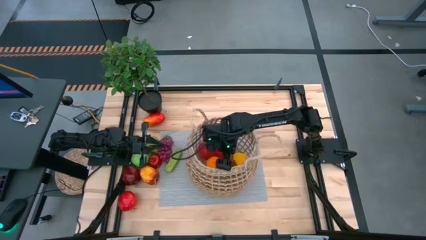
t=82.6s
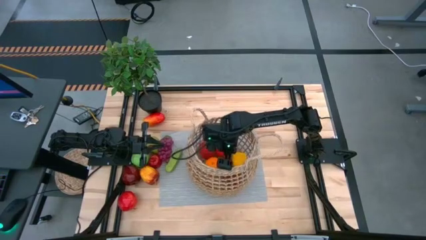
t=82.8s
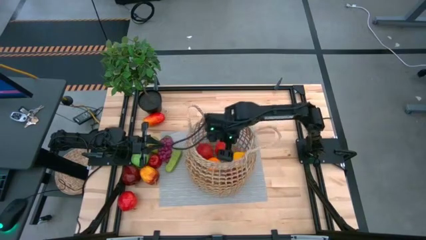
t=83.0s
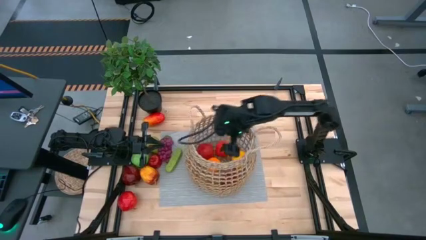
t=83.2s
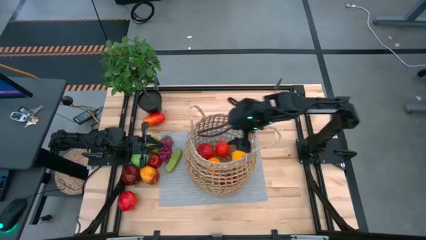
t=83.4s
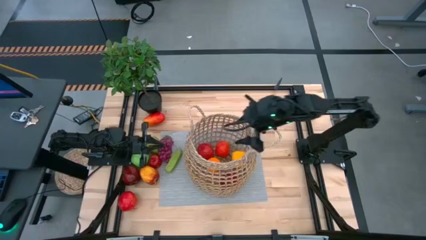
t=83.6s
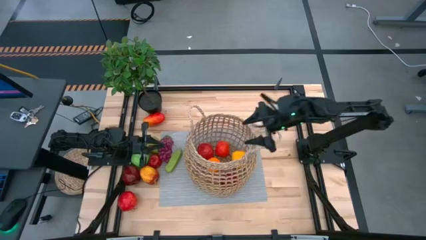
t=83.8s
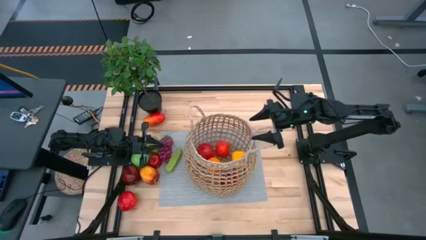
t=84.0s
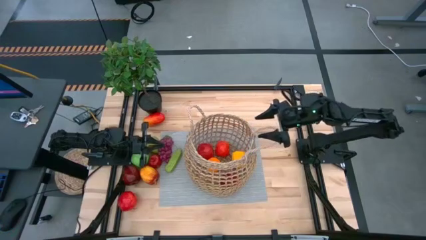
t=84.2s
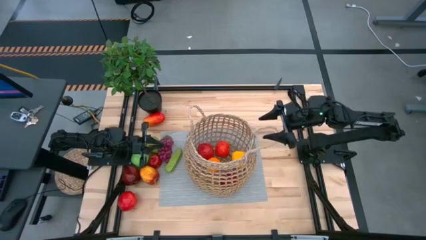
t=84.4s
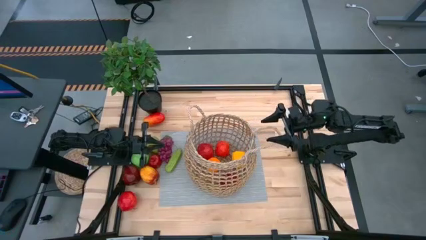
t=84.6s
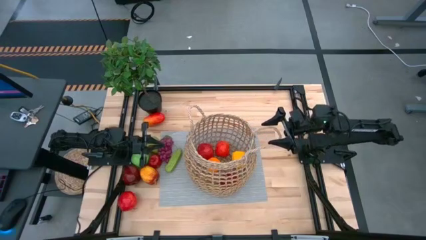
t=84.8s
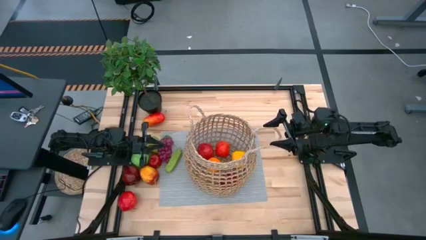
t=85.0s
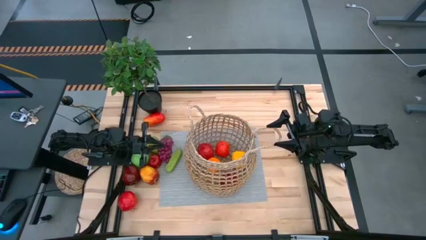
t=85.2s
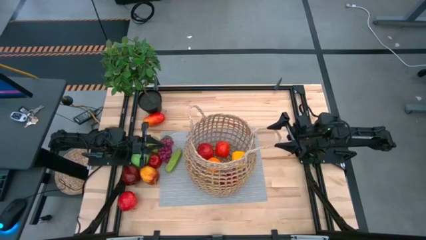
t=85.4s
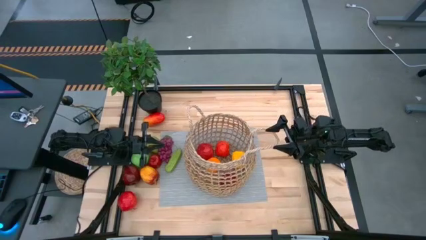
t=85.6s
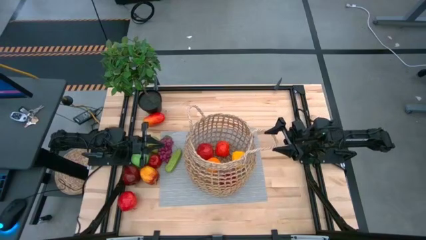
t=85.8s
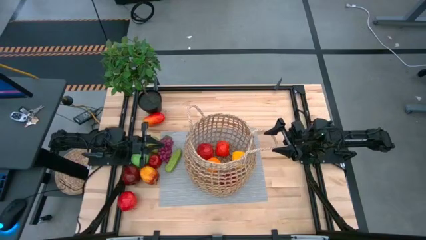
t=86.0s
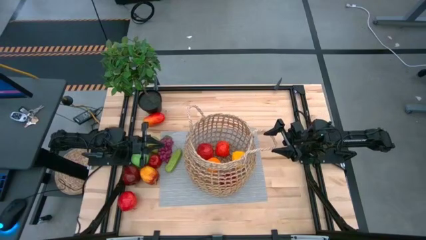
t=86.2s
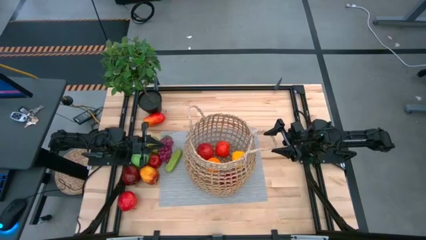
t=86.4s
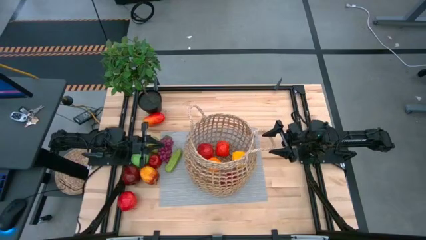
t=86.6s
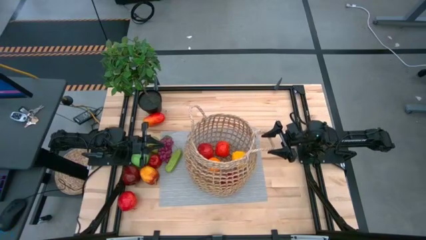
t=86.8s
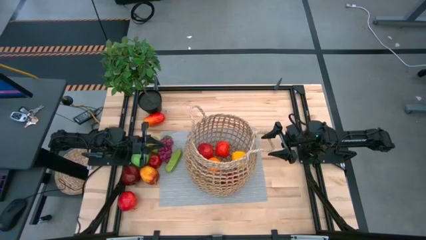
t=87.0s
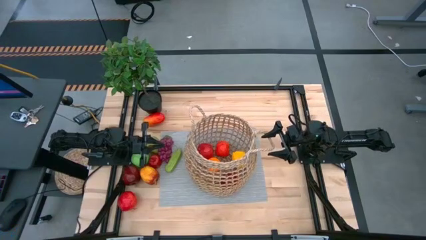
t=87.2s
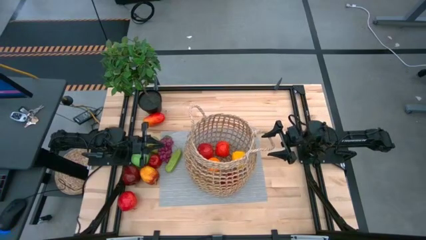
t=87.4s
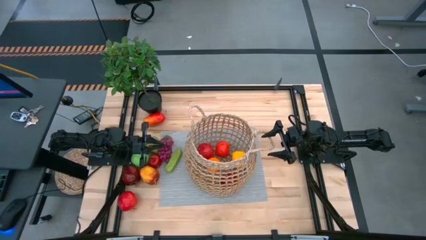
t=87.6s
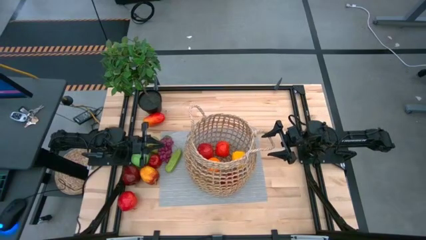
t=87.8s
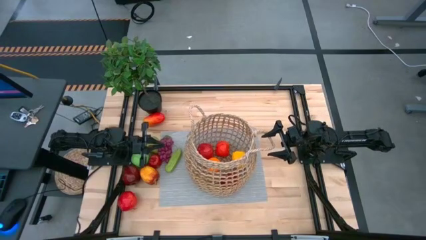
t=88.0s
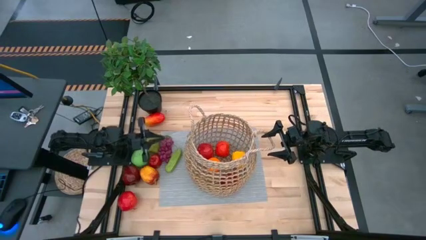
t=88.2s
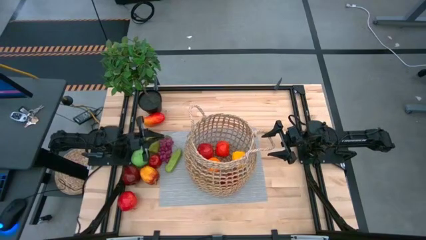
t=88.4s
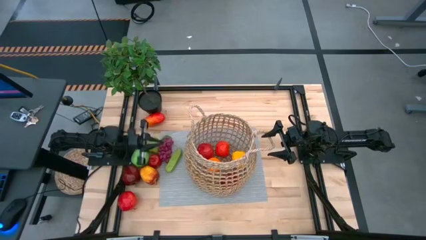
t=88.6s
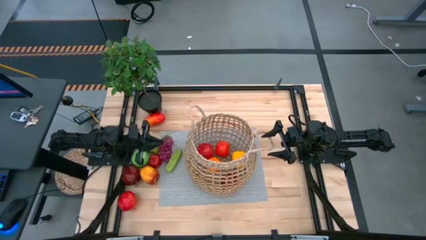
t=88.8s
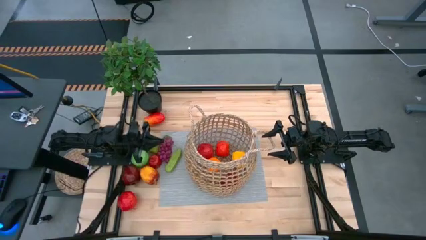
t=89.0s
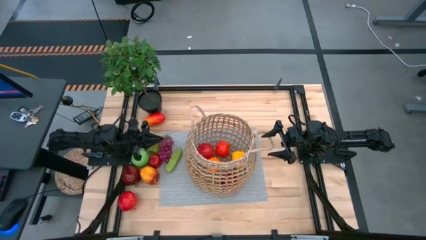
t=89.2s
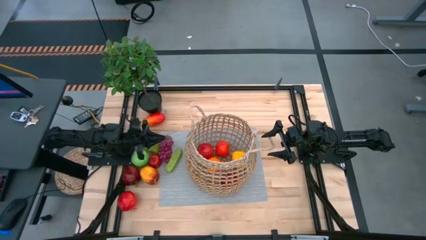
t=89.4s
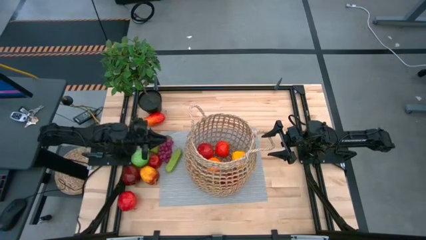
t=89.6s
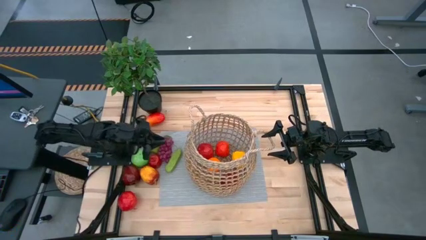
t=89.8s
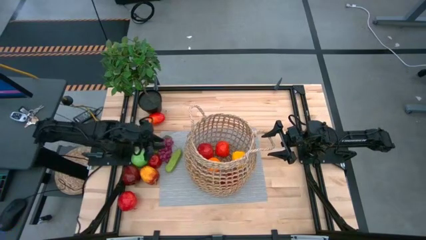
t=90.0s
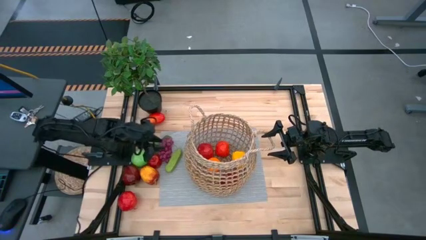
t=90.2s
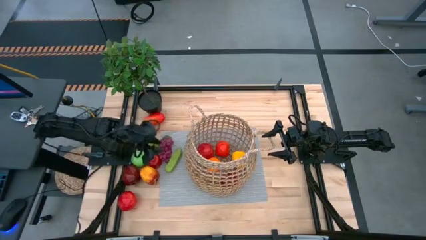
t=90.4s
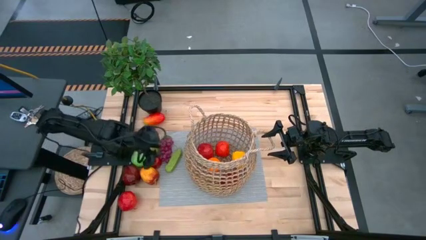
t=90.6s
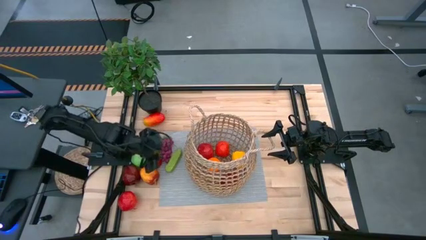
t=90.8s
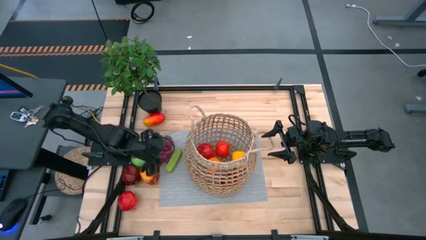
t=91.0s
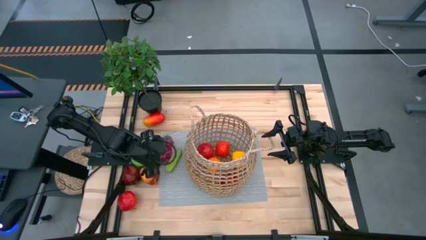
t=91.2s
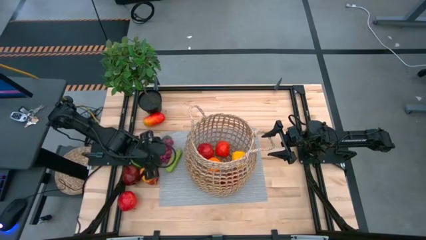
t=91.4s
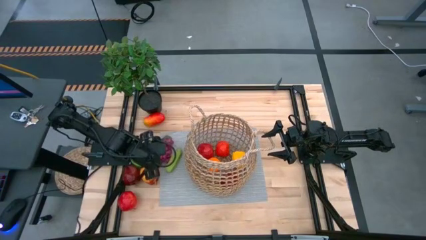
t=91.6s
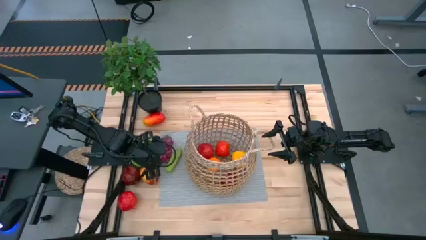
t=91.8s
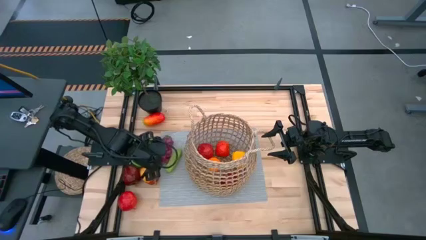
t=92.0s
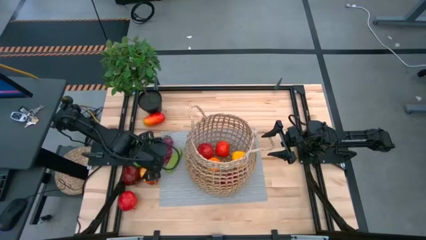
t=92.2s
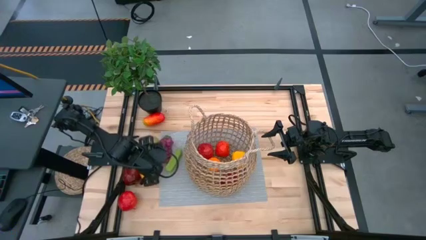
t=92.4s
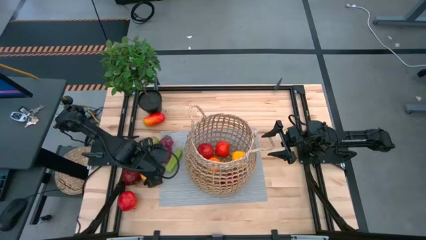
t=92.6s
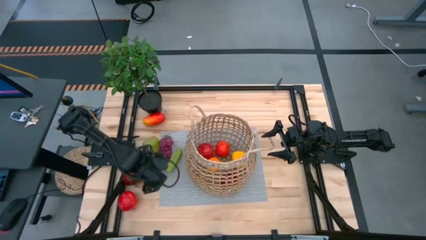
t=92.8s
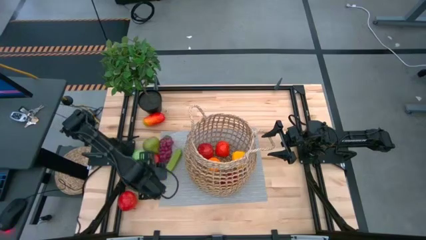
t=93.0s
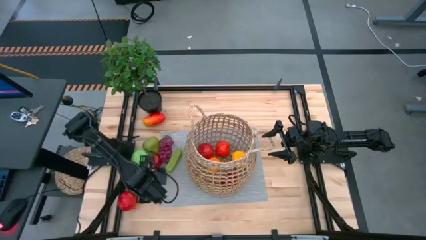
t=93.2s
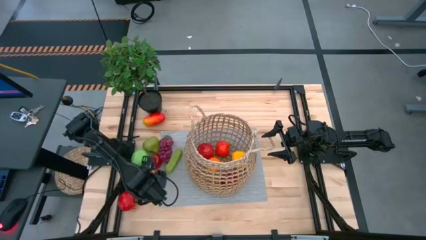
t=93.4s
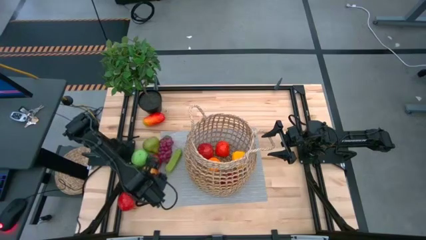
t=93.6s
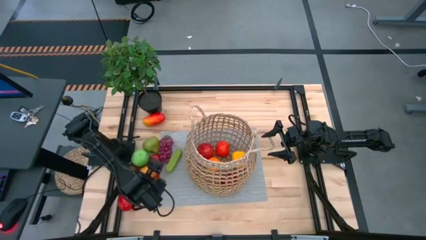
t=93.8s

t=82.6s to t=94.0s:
Task: Build produce basket
Put the red apple into the brown basket

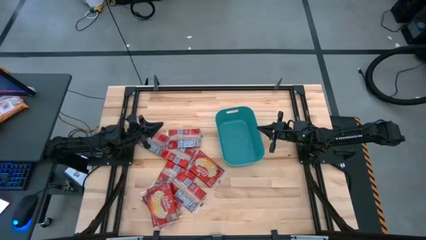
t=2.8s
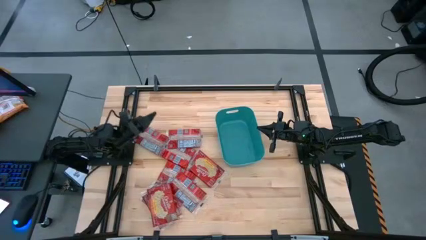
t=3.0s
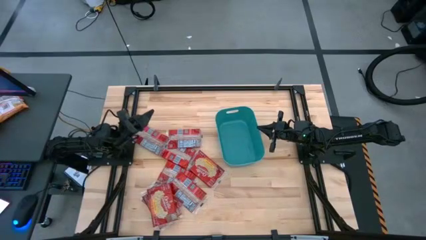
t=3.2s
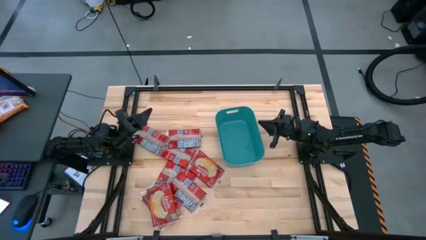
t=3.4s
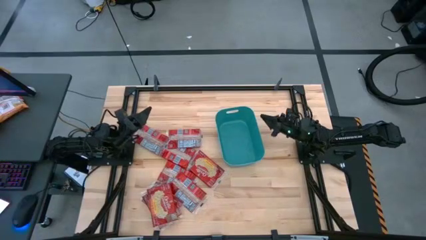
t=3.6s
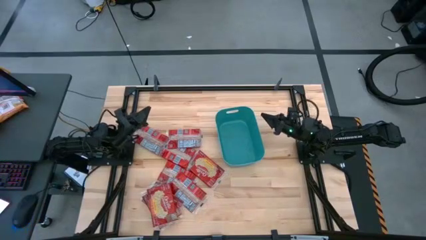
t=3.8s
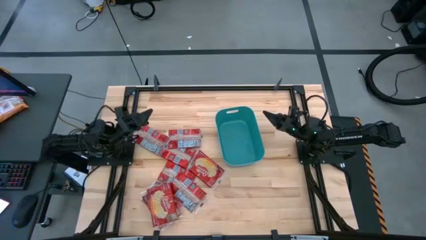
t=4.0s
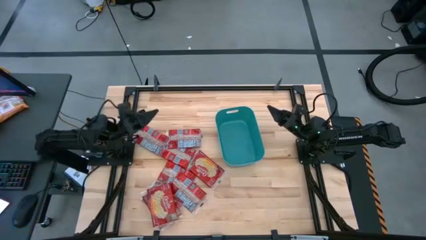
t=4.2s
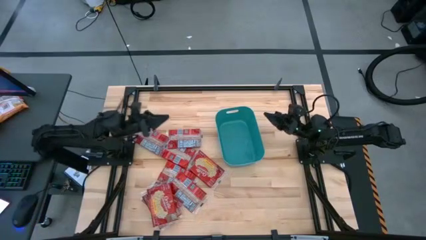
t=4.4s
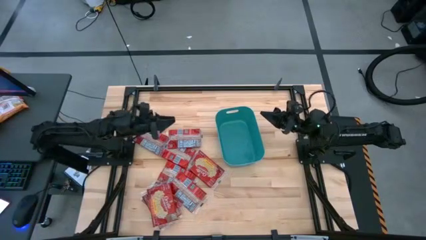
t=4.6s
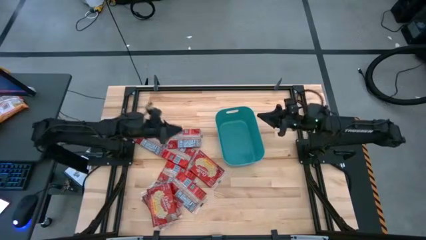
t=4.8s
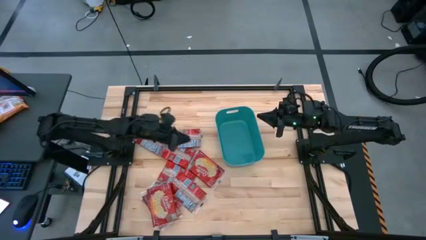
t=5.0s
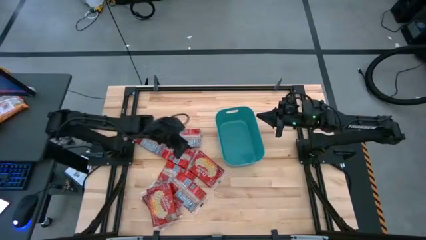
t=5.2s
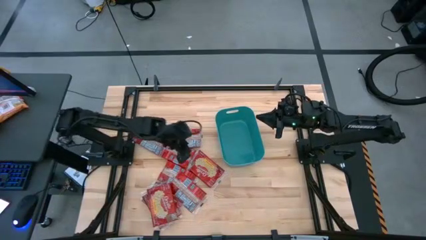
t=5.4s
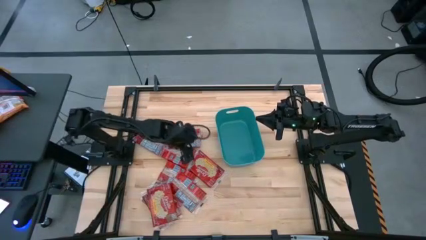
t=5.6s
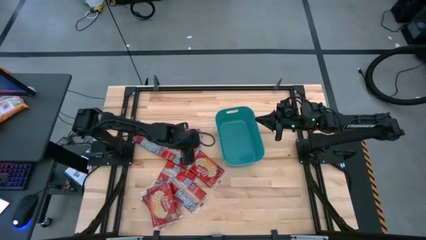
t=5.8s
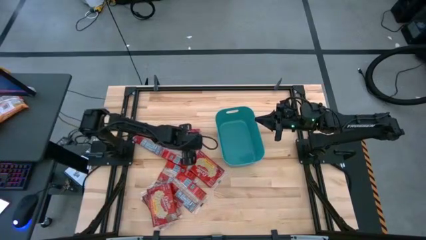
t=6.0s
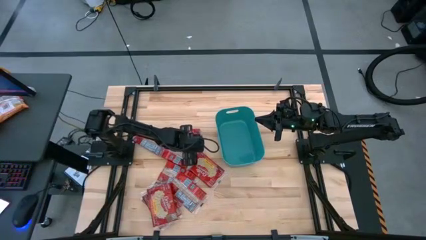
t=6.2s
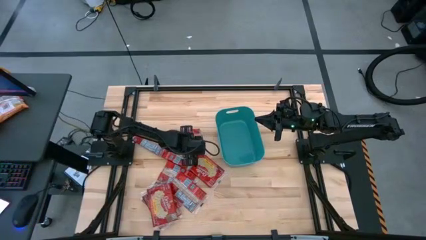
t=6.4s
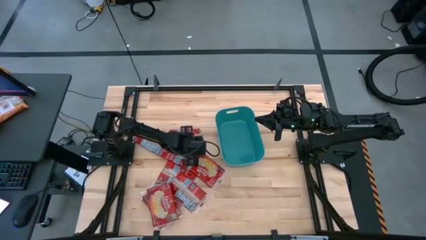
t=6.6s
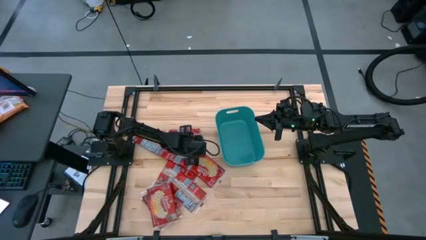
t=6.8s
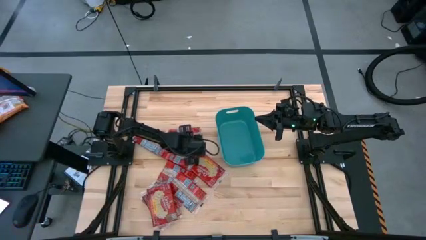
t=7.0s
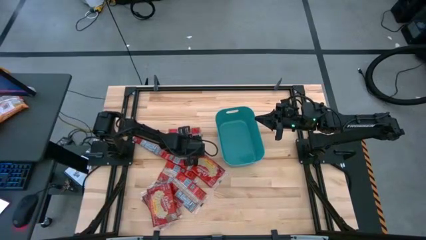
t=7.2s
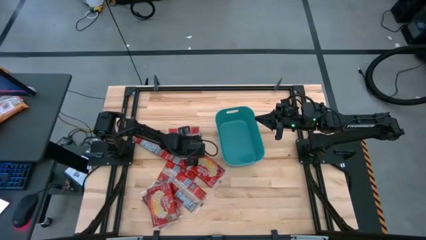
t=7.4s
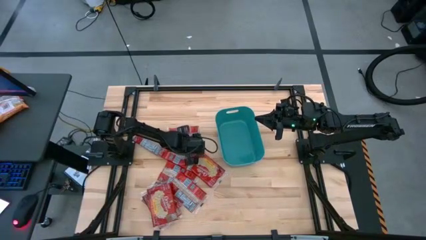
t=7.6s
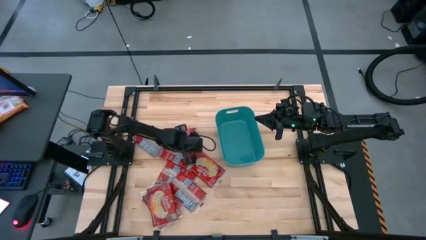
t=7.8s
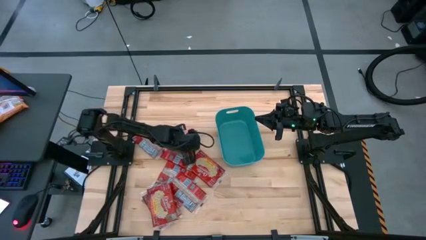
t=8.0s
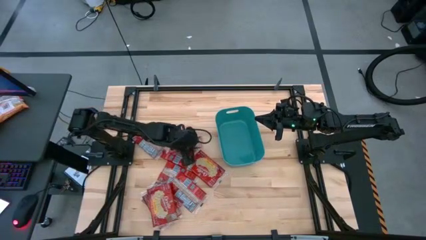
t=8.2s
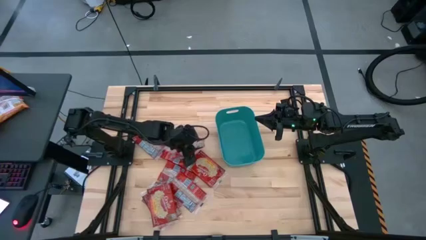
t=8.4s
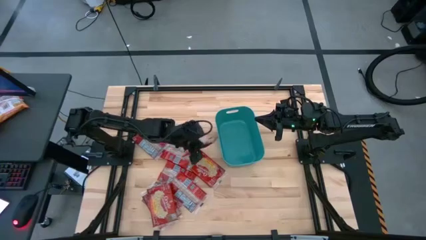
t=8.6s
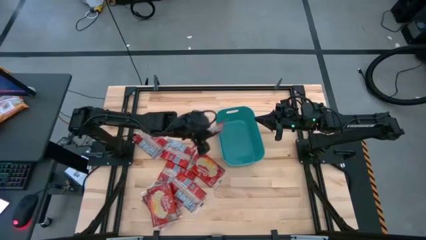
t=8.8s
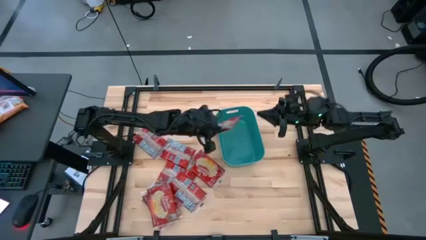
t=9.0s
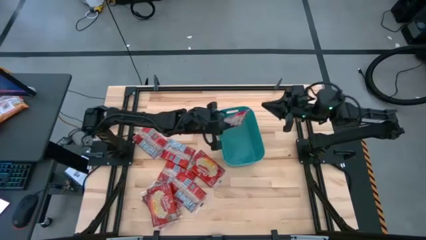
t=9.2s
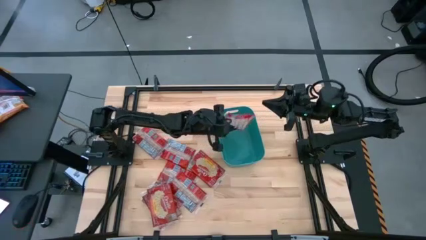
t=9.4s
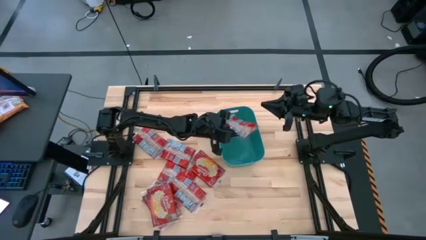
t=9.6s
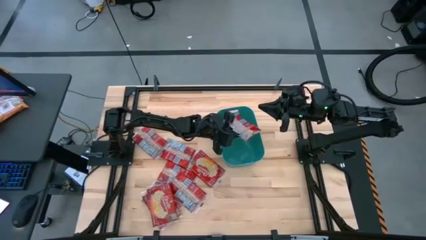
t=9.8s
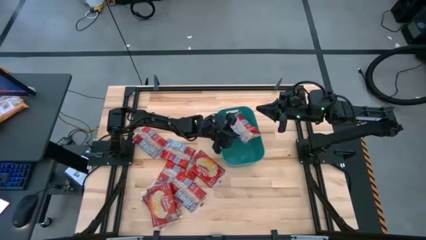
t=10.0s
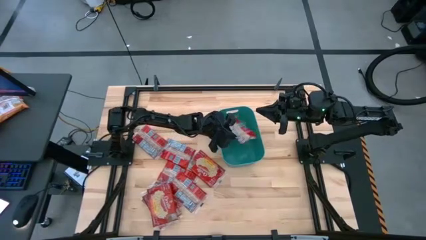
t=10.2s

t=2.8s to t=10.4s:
Task: Sort popcorn bags into baskets
Put the red popcorn pack into the green bin
